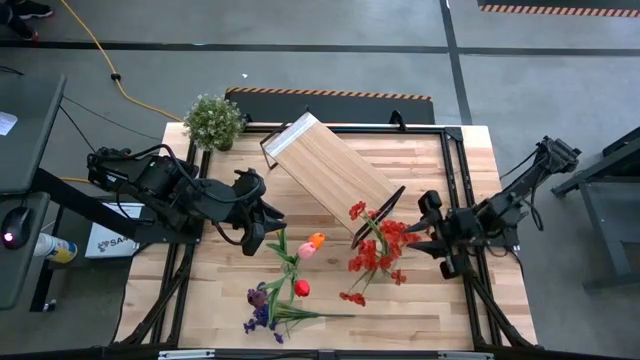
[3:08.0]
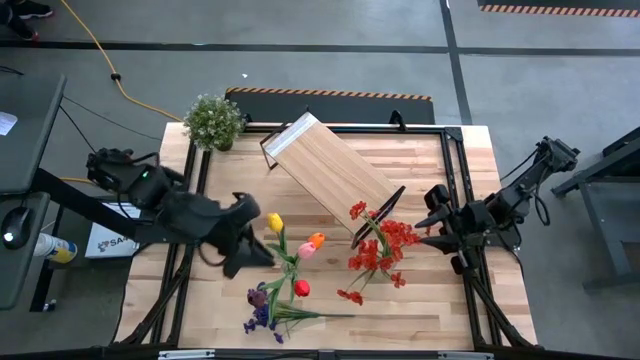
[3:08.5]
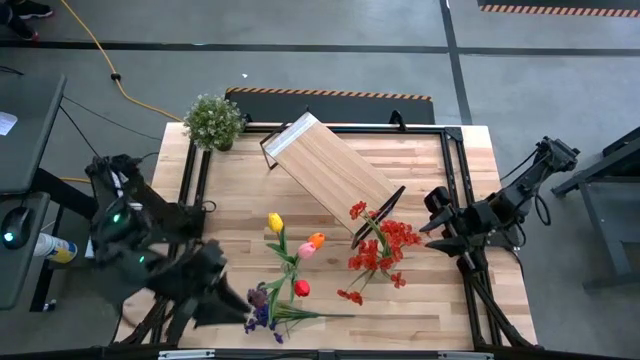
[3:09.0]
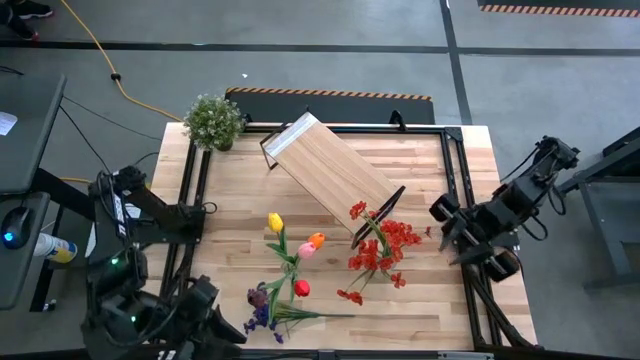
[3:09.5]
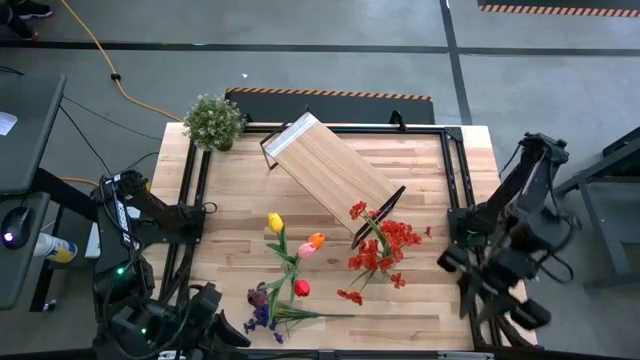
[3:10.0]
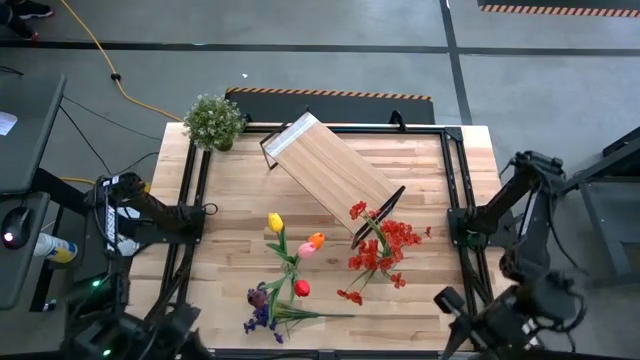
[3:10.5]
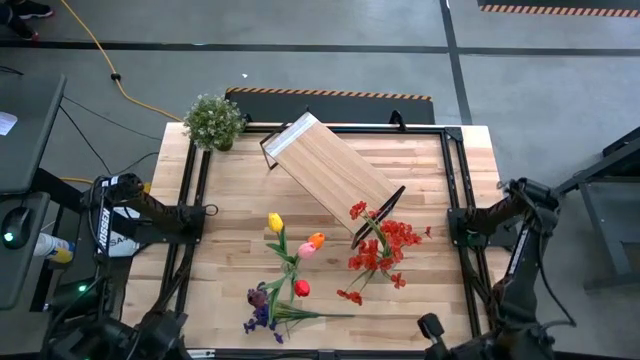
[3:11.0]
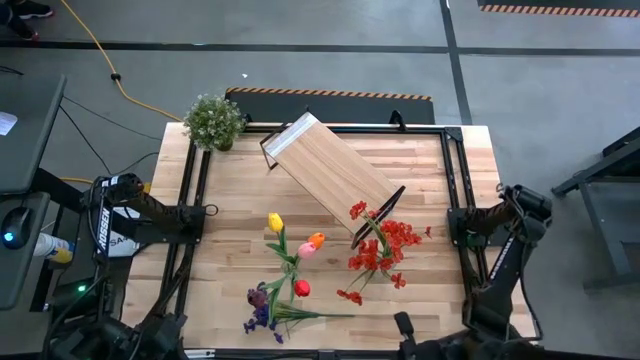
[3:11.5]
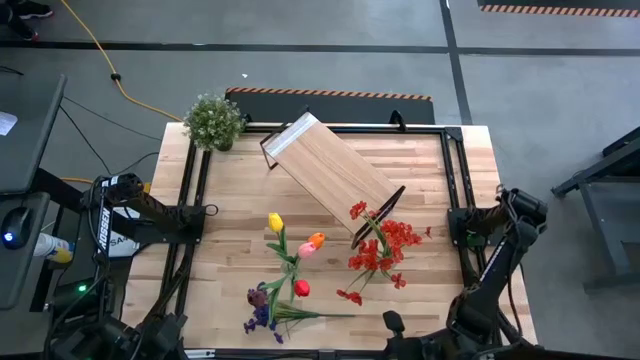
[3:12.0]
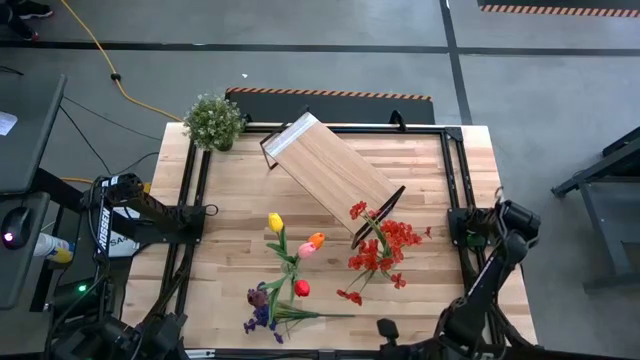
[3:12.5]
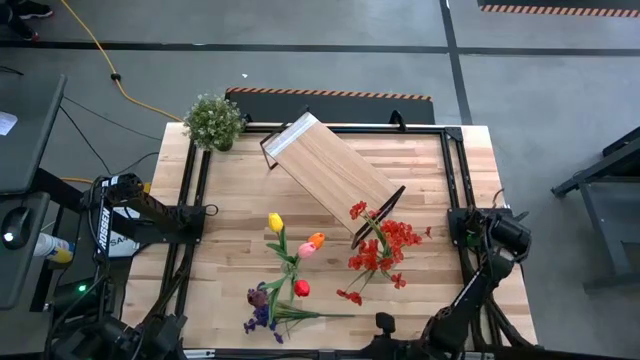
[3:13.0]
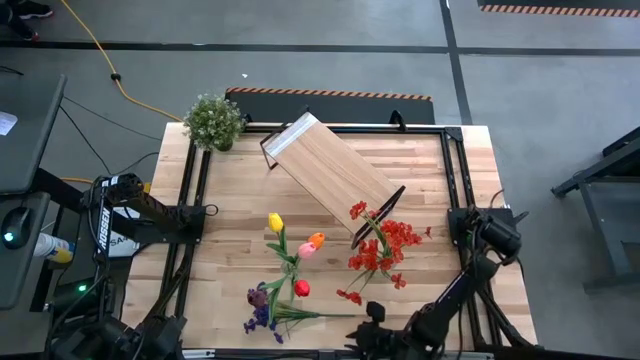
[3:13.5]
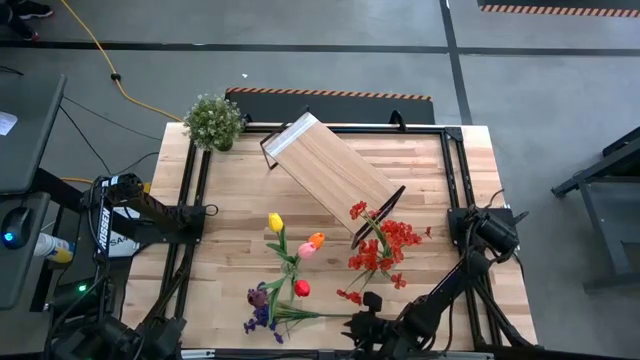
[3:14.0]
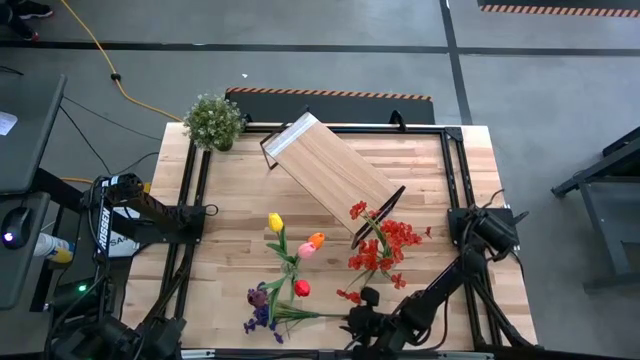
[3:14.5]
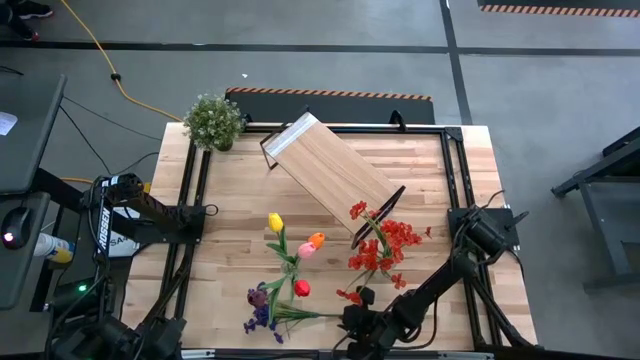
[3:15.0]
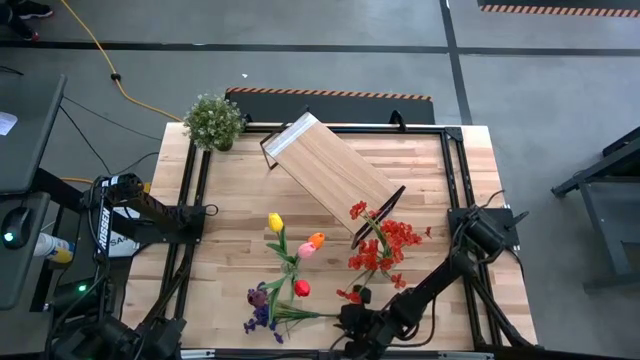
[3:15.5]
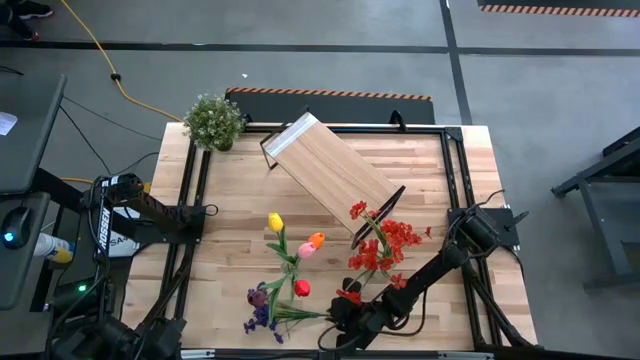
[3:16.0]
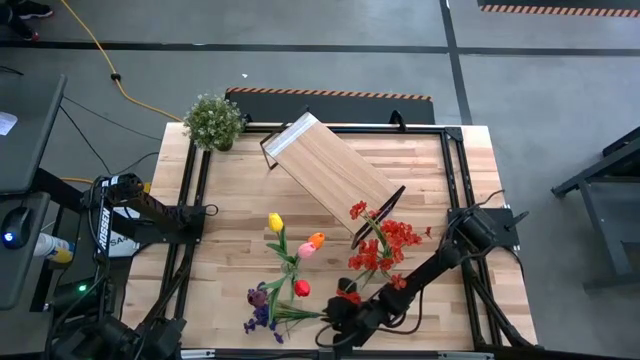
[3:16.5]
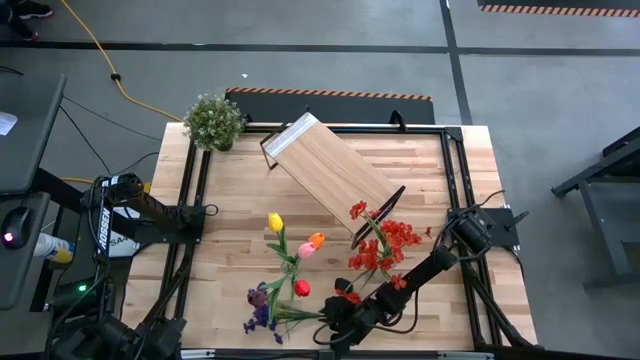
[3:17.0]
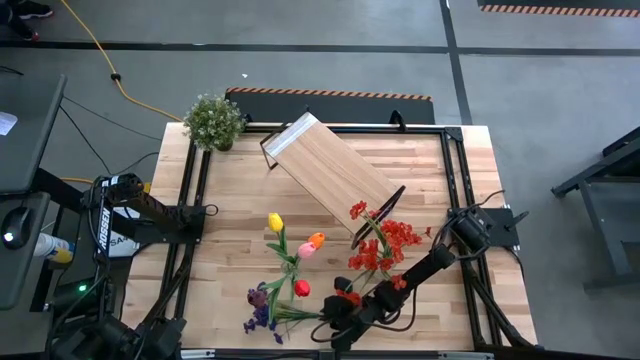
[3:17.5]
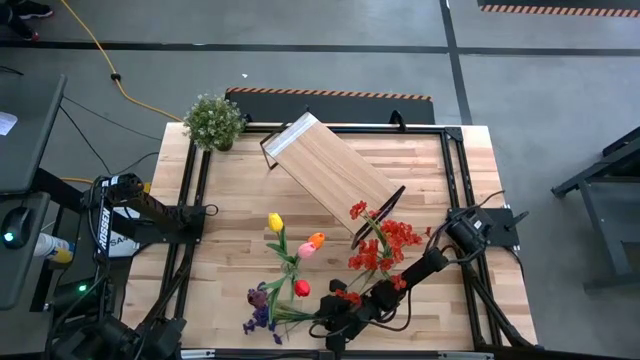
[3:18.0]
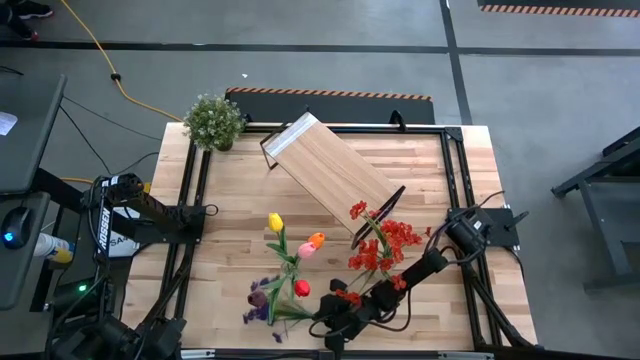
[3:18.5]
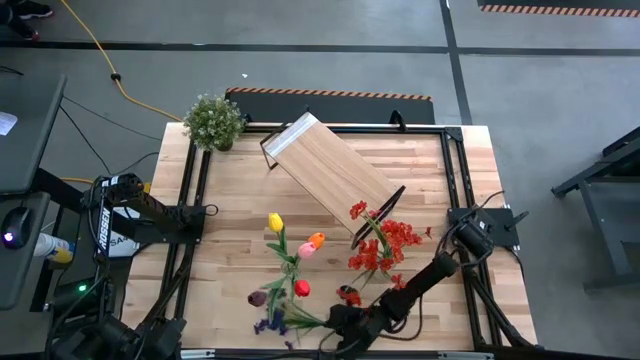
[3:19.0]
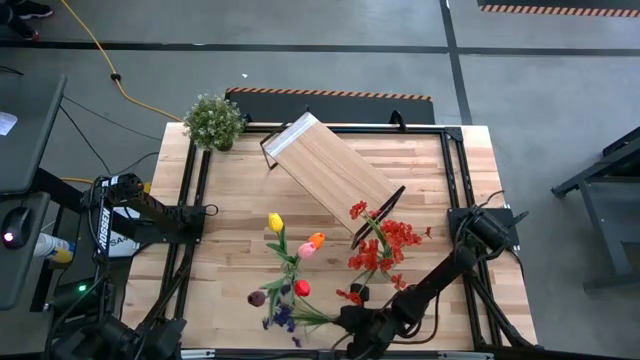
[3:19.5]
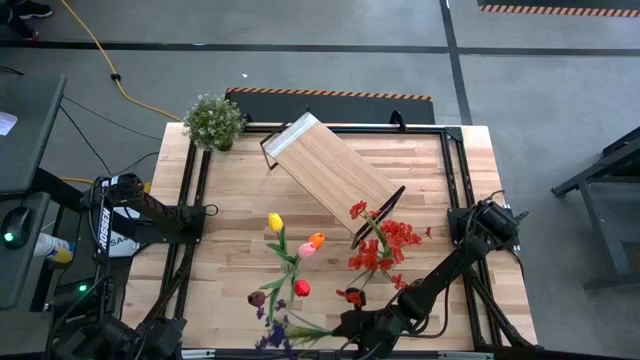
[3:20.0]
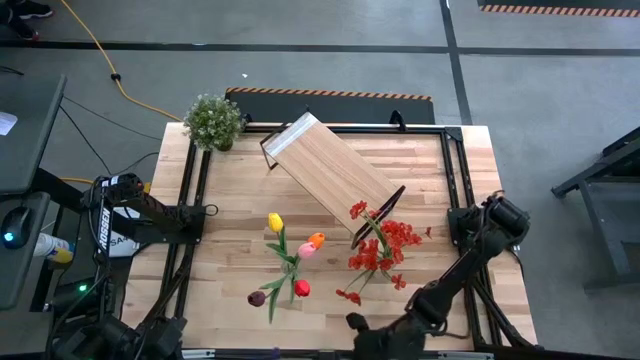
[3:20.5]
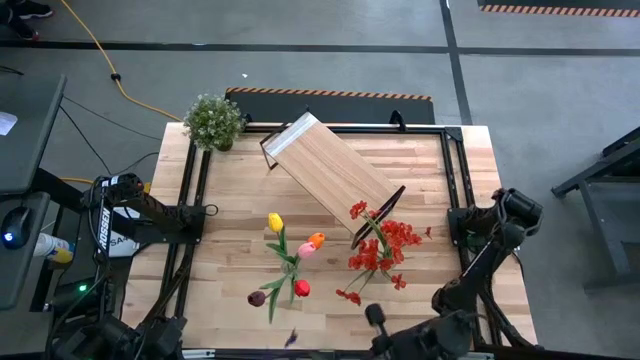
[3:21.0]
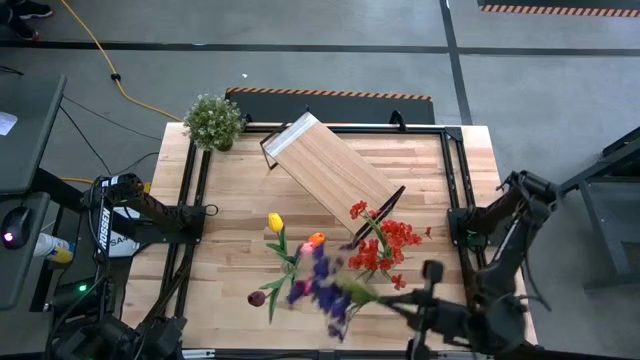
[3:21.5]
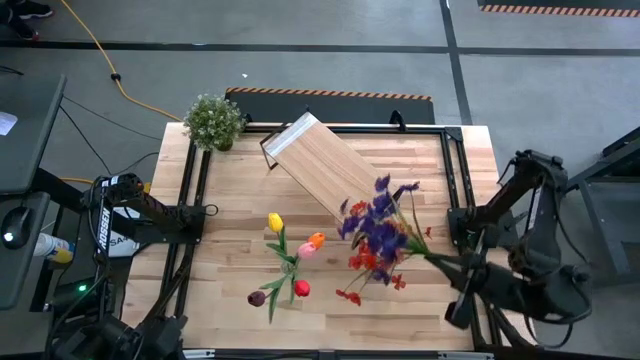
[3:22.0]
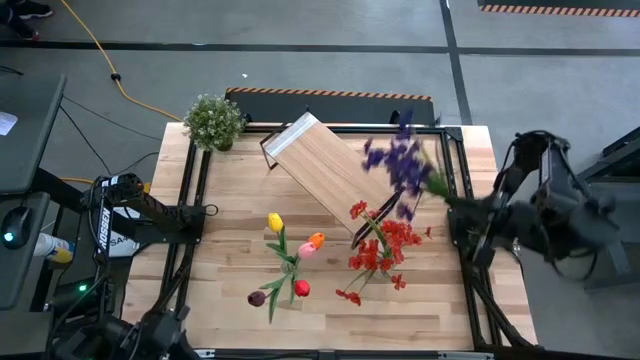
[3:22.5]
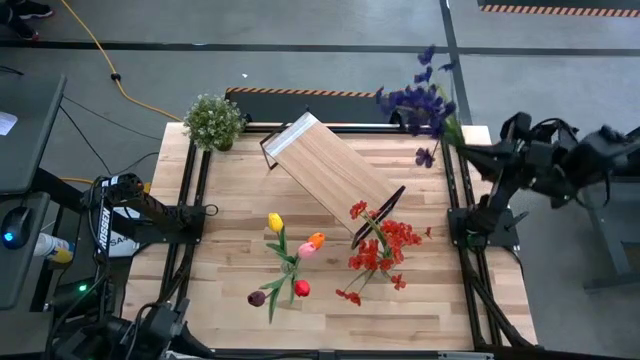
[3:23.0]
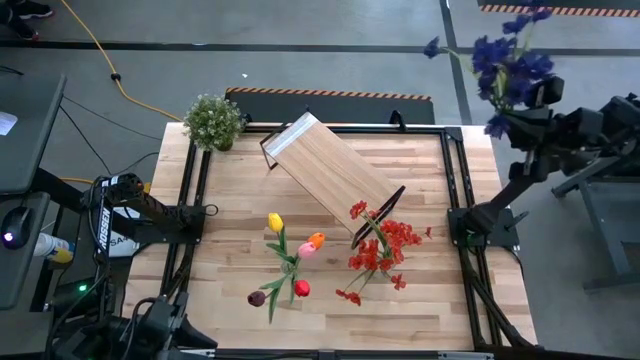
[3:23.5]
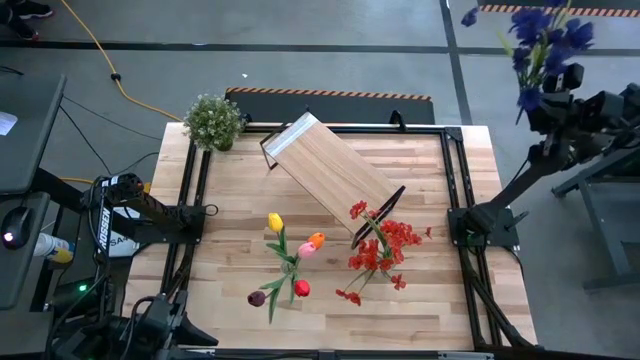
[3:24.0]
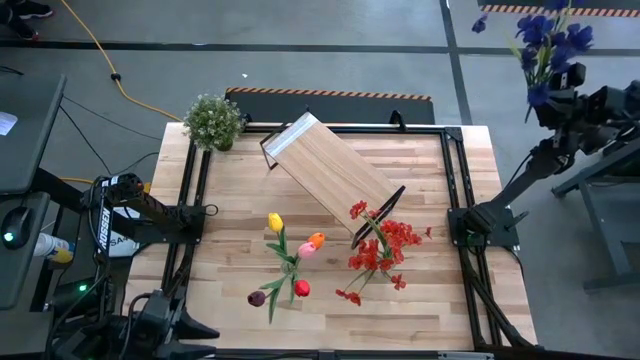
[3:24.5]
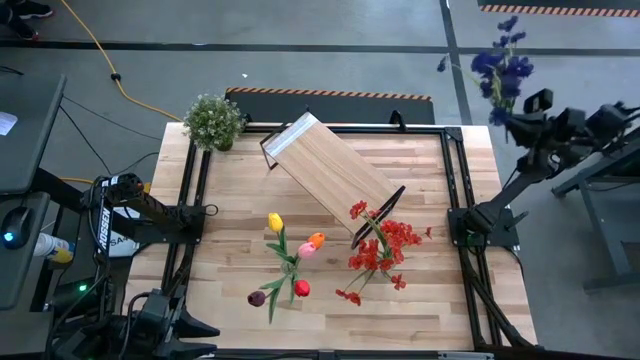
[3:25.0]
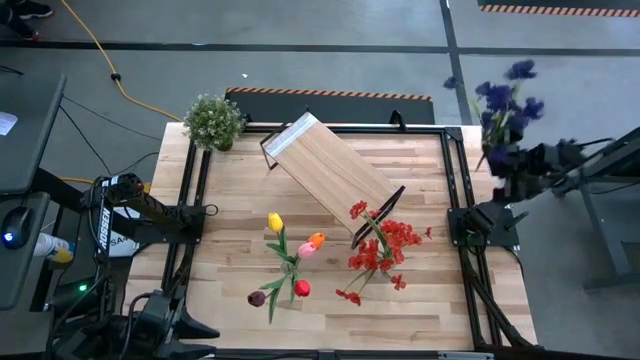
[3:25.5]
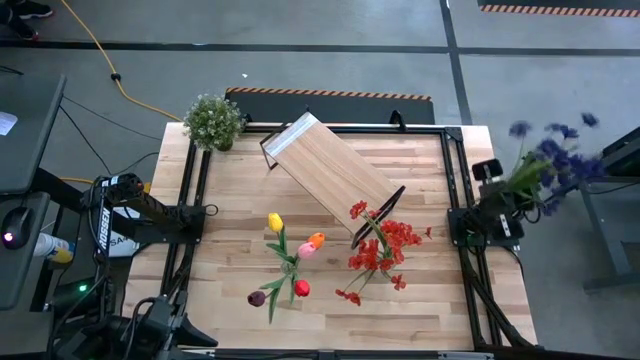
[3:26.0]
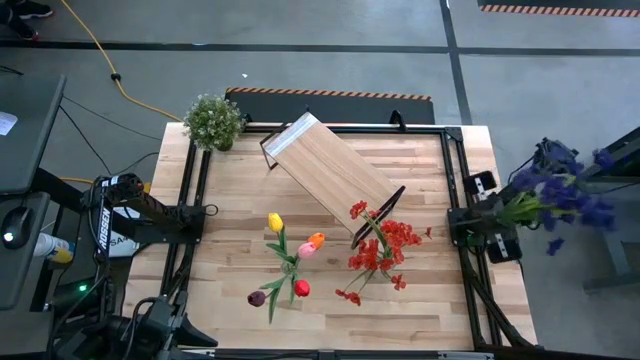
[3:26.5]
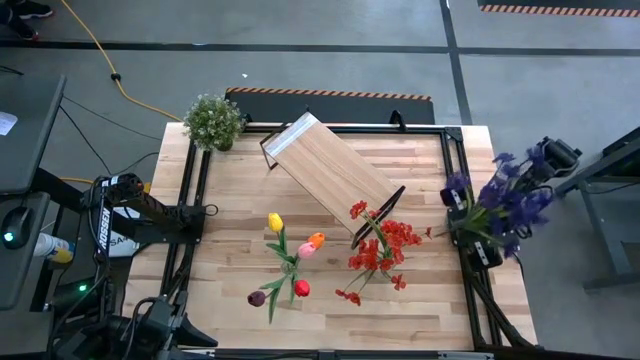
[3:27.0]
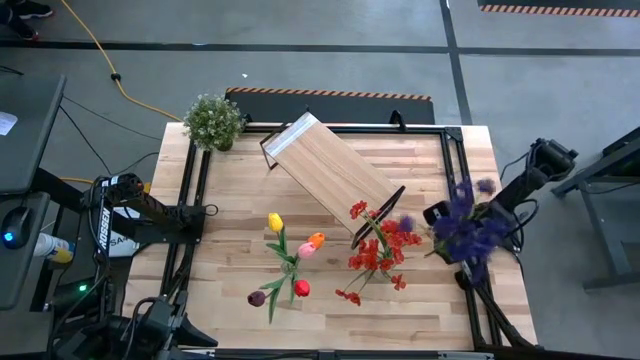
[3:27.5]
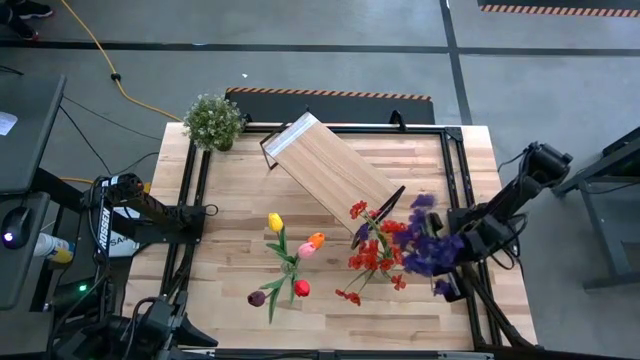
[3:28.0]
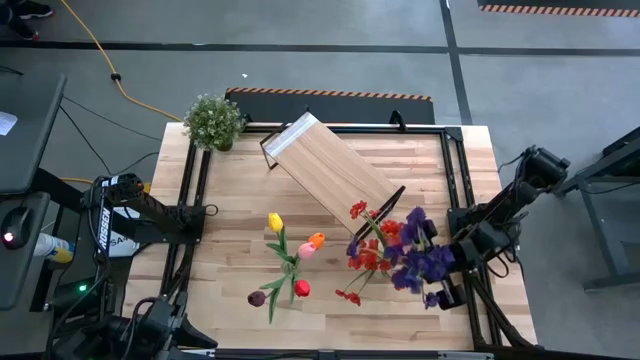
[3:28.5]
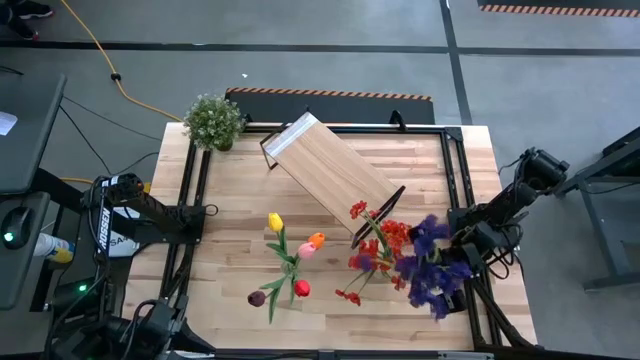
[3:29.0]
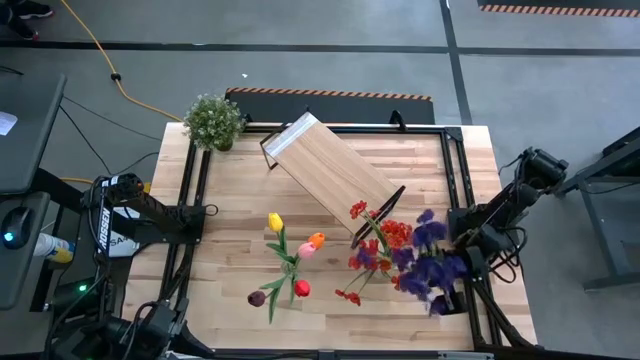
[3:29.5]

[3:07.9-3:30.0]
Task: Pick and place flowers into a vace then onto a shelf
Put the blue flowers into the right transparent vase
